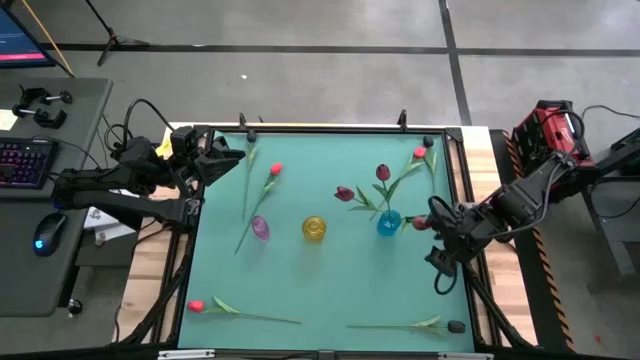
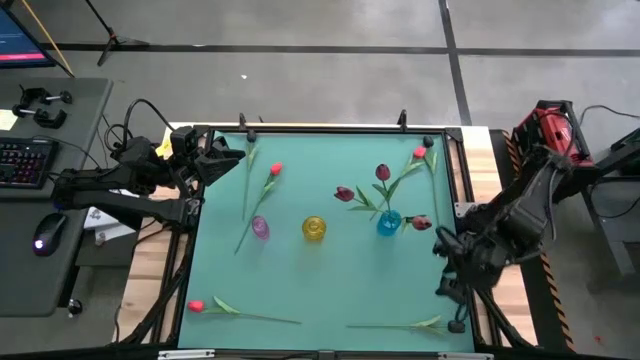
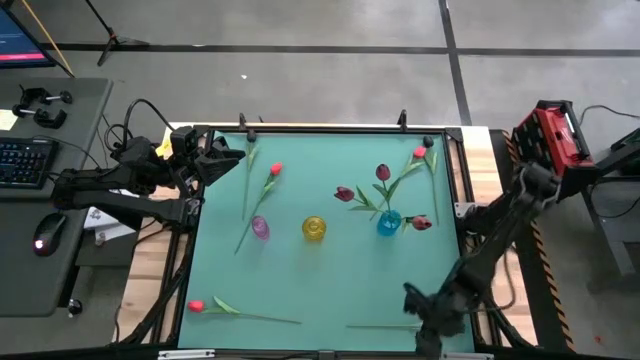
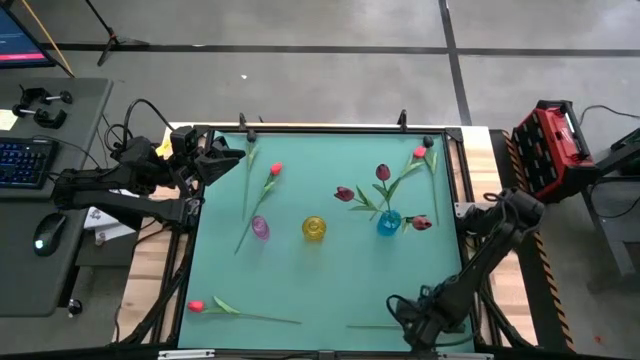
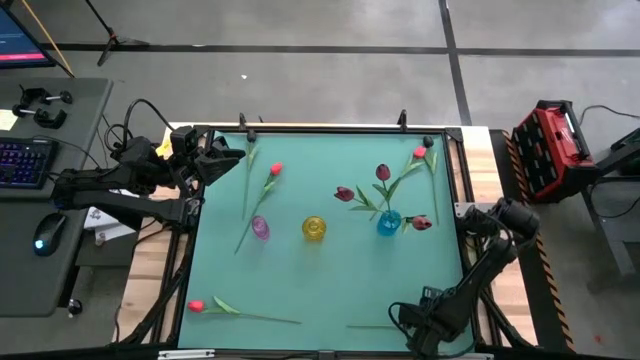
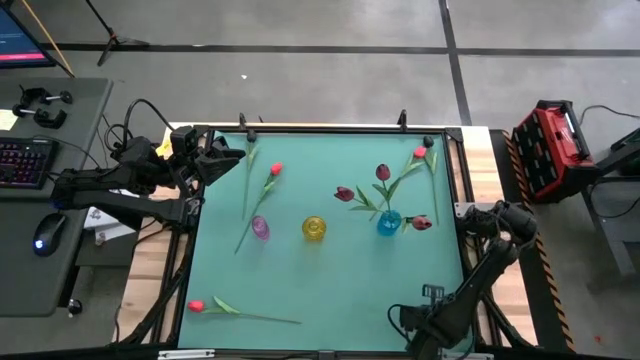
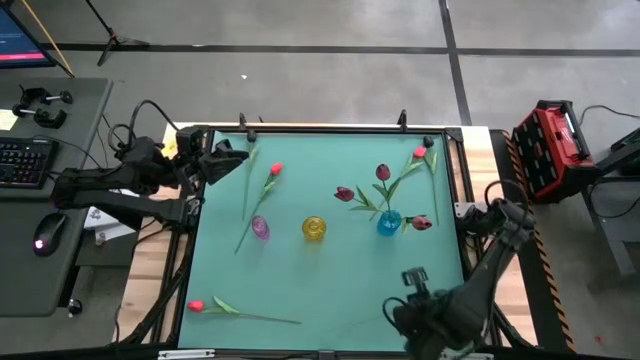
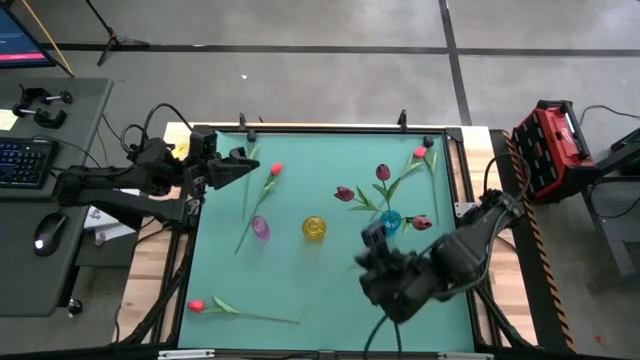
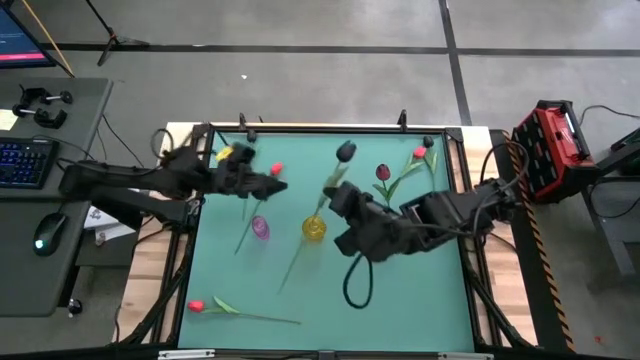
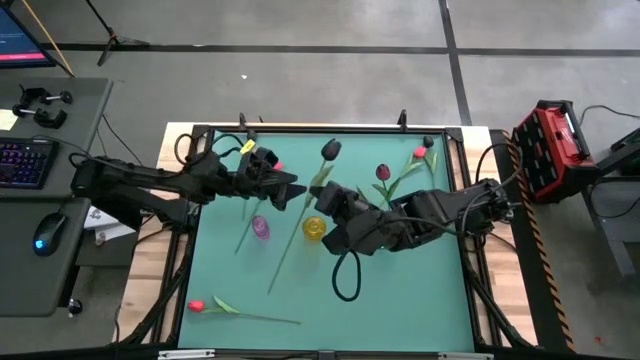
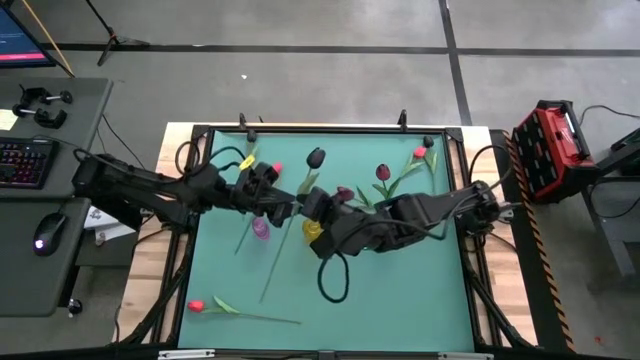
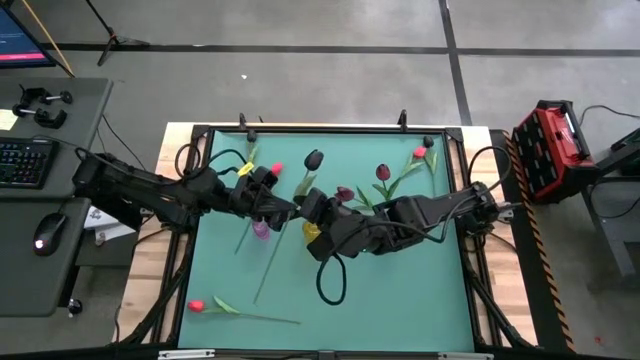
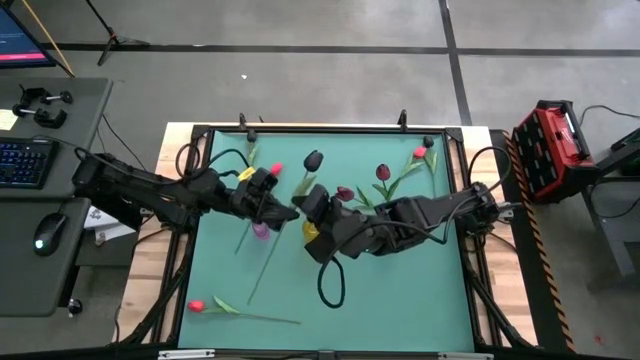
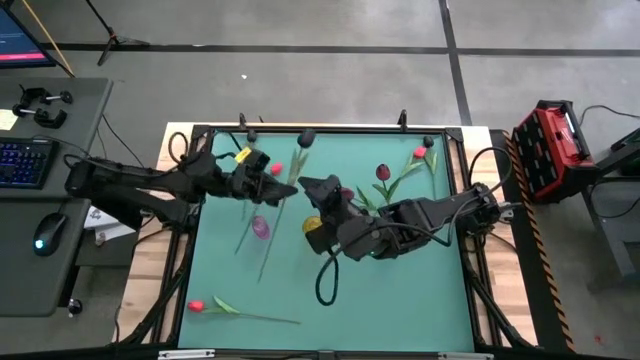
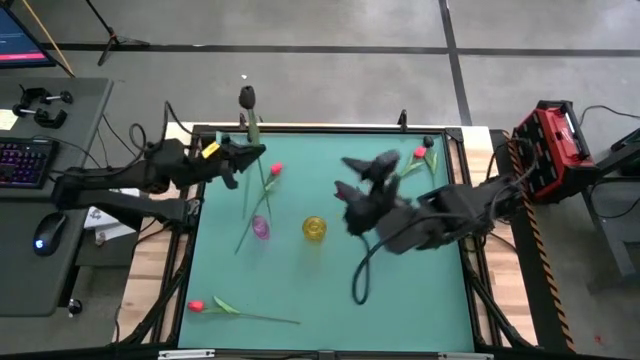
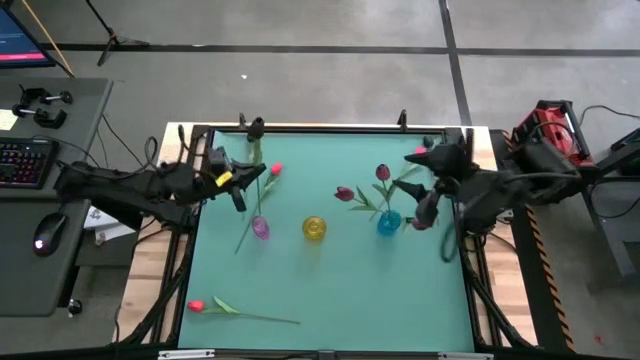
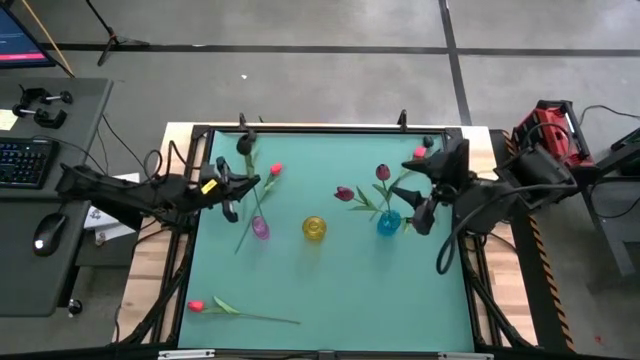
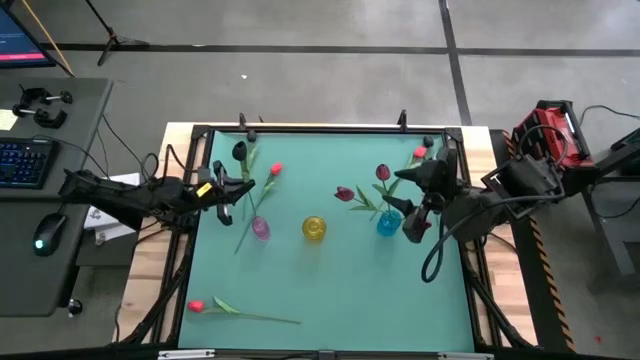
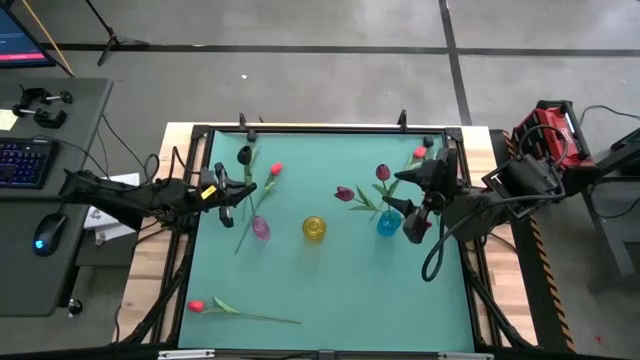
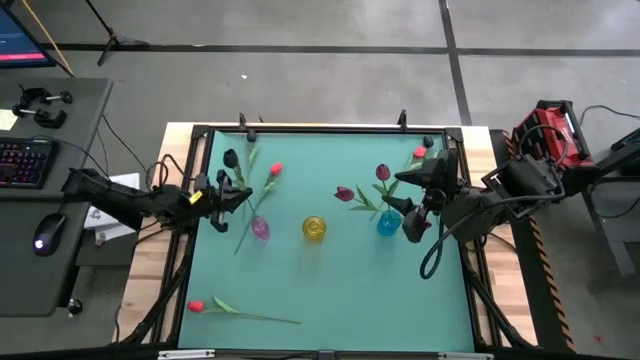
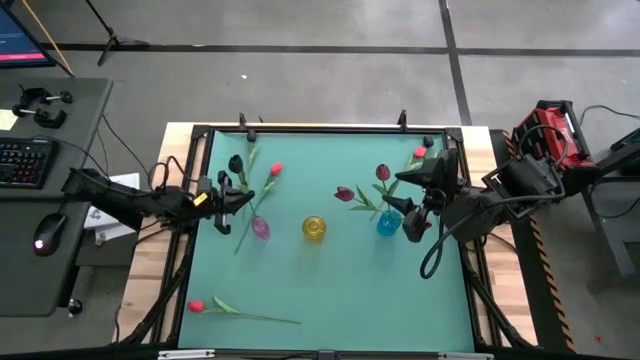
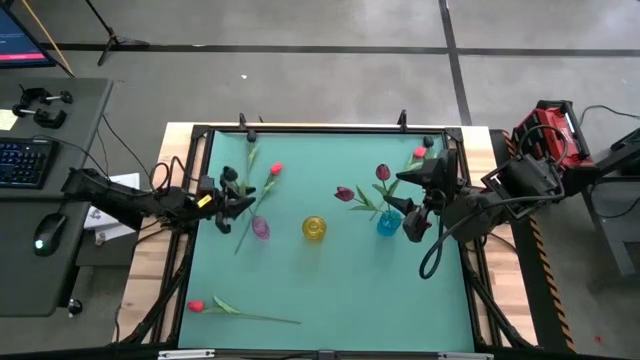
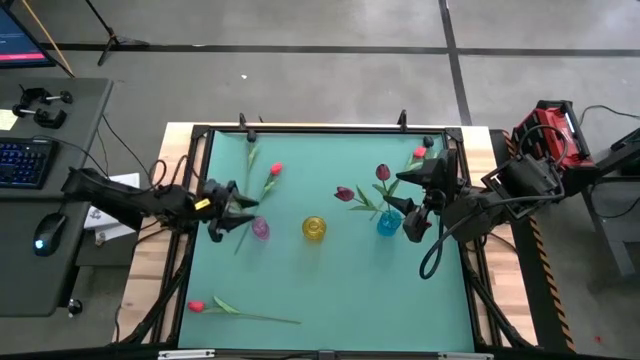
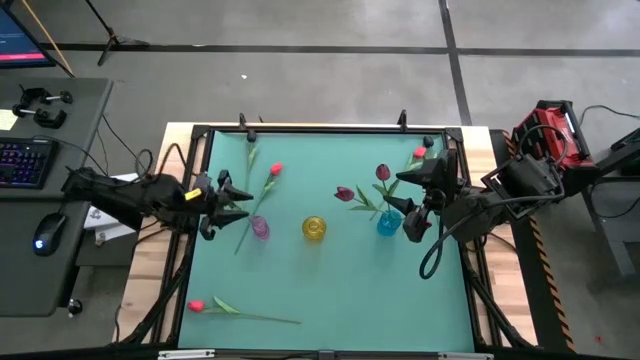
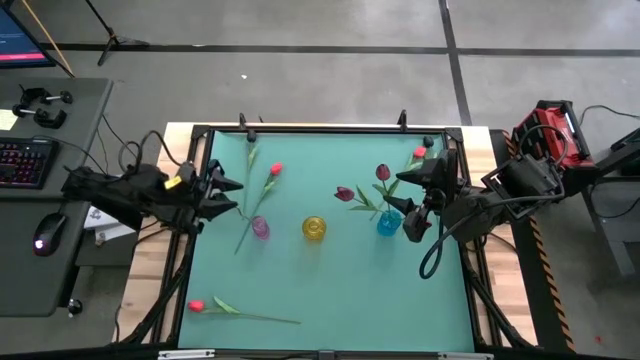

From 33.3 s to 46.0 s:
Task: Sort flowers into vase by color
Put the bottom black flower into the purple vase

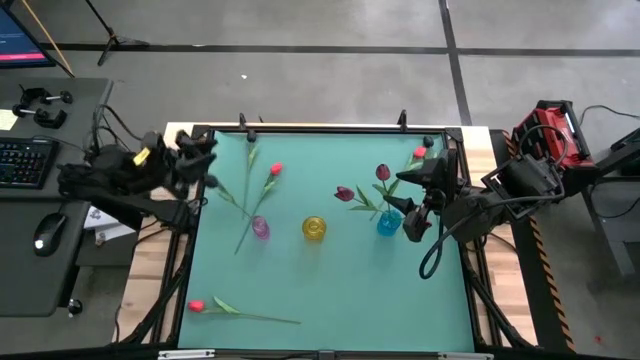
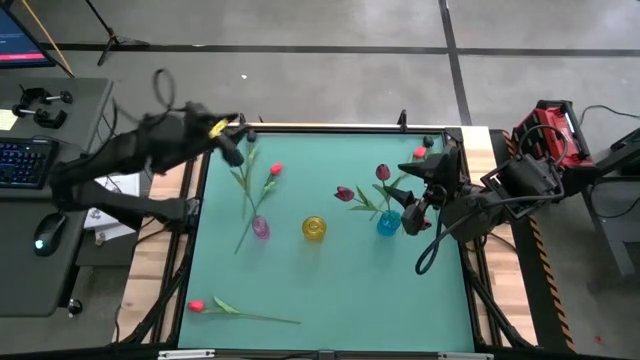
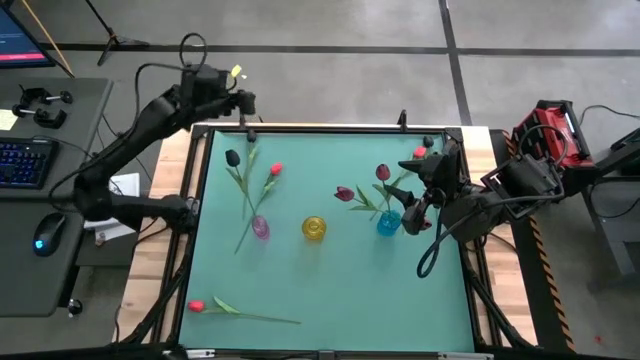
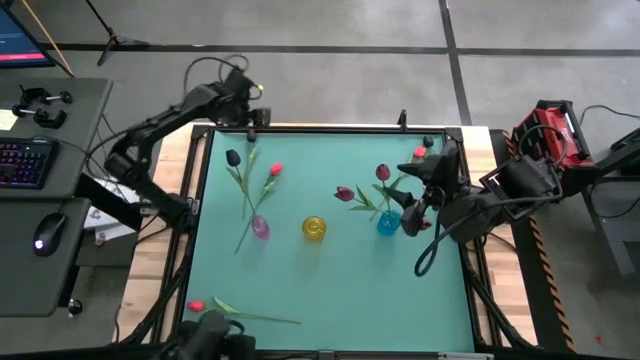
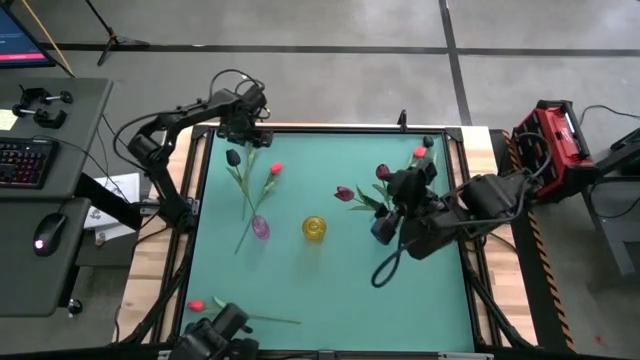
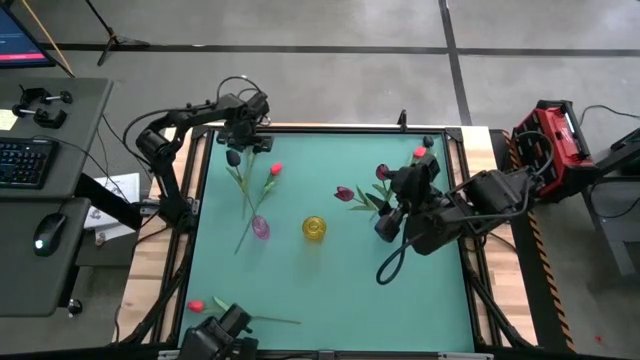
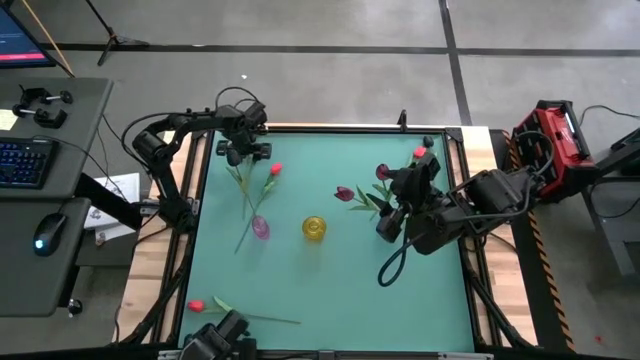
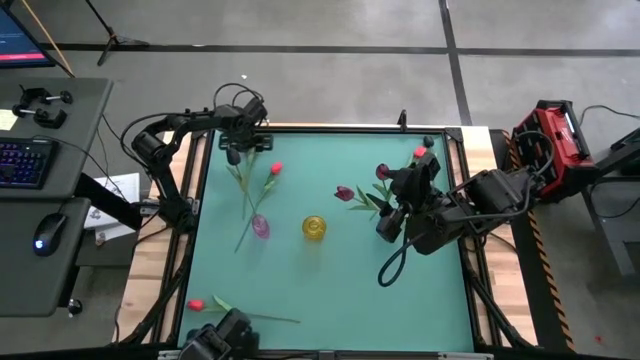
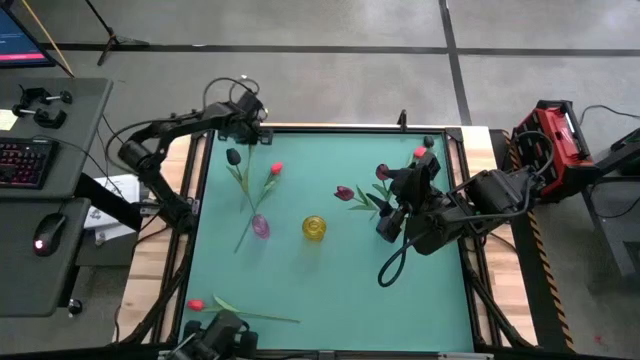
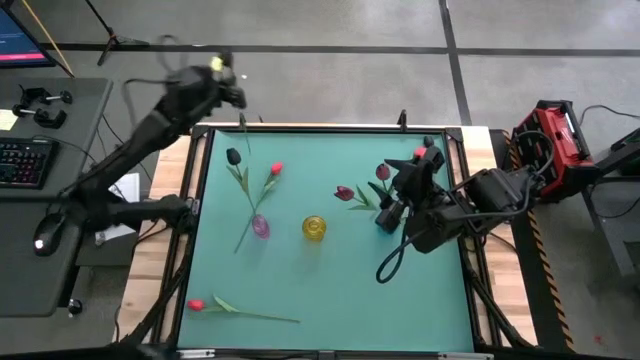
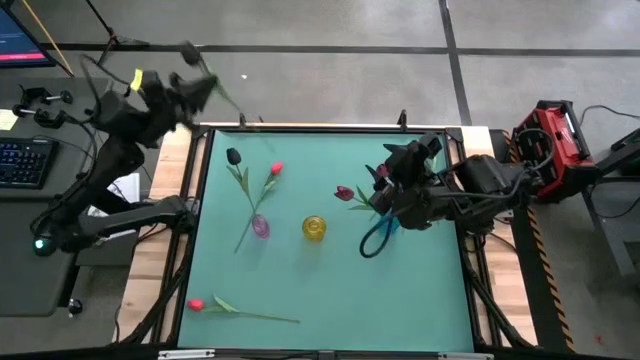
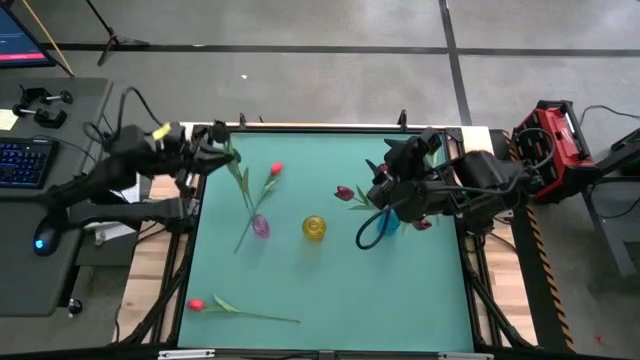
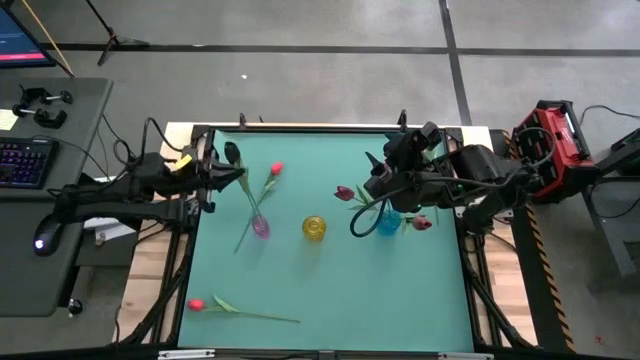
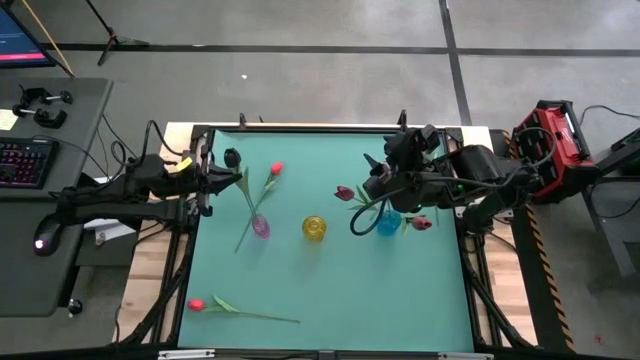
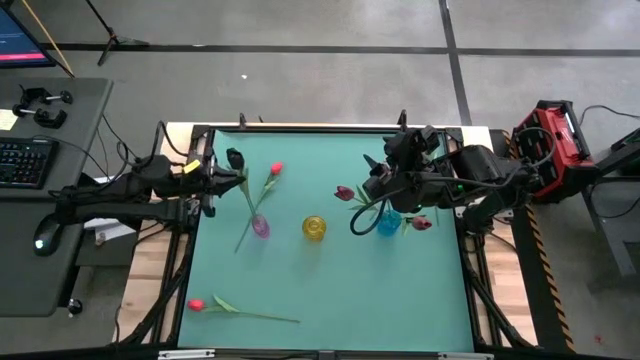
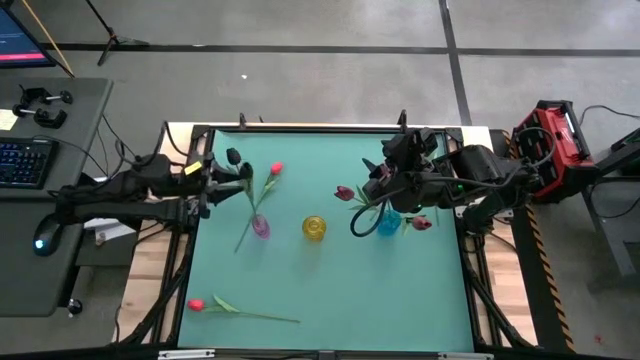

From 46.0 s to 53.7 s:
Put the left black flower into the purple vase

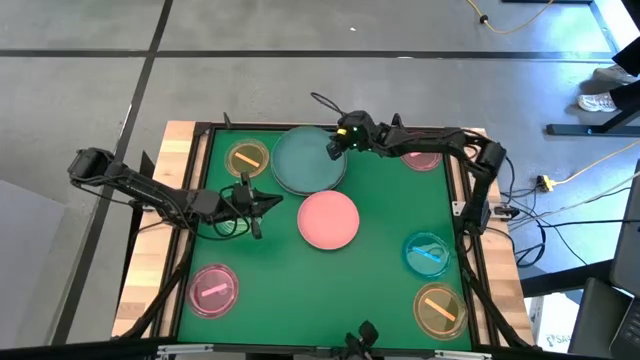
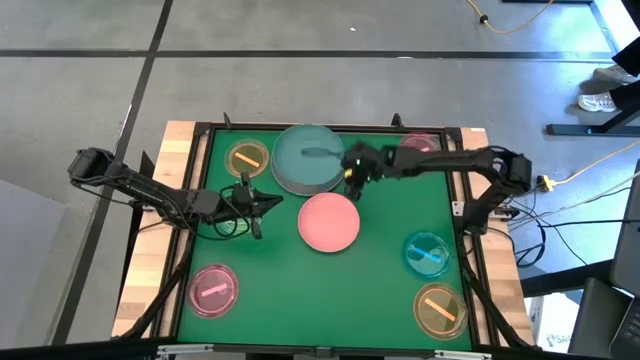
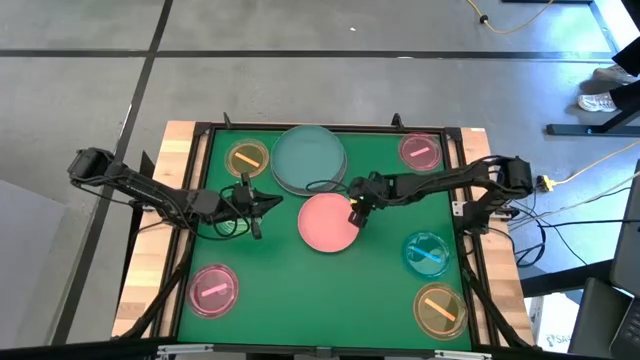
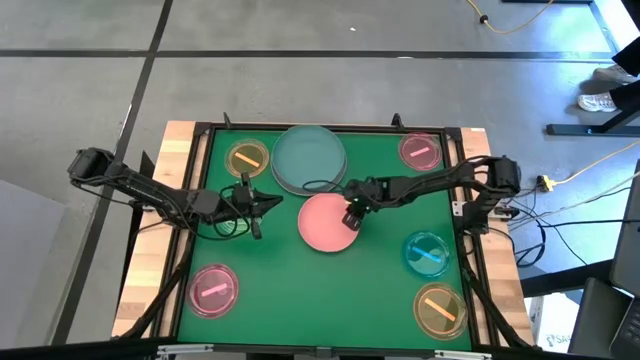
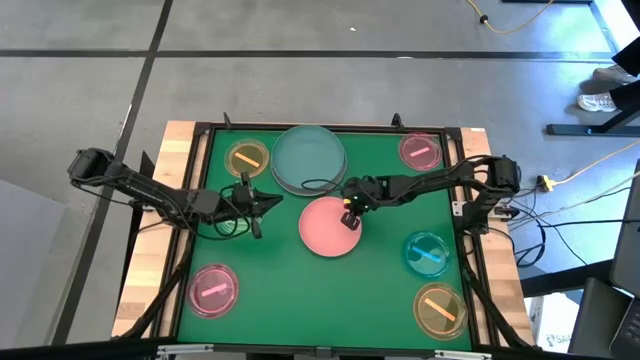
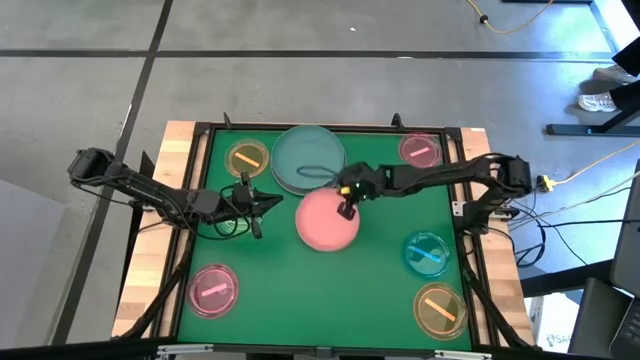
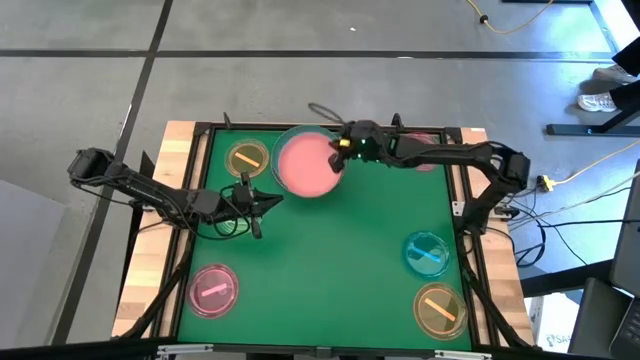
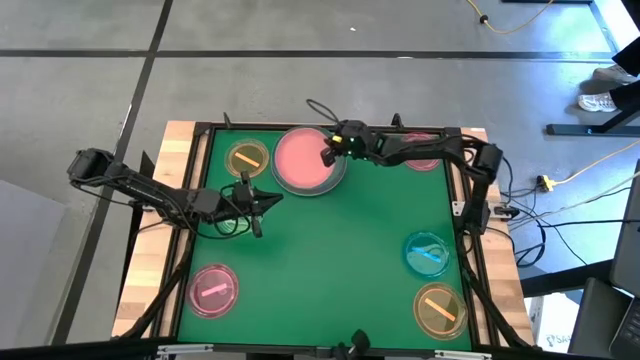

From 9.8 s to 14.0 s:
Task: Stack plastic plates
Stack the light pink plate on top of the green plate
